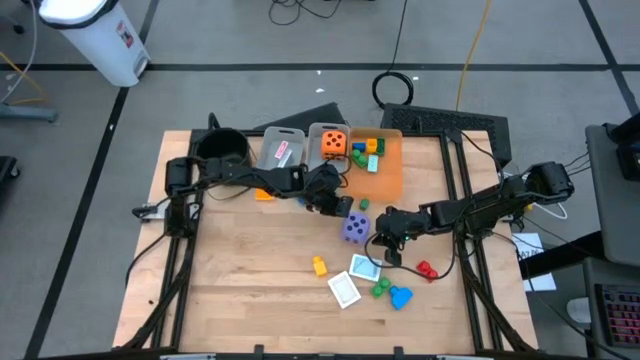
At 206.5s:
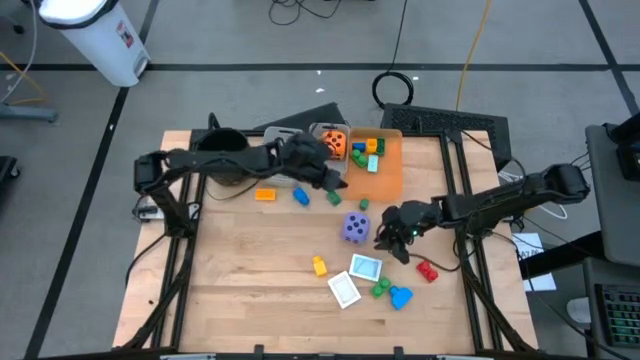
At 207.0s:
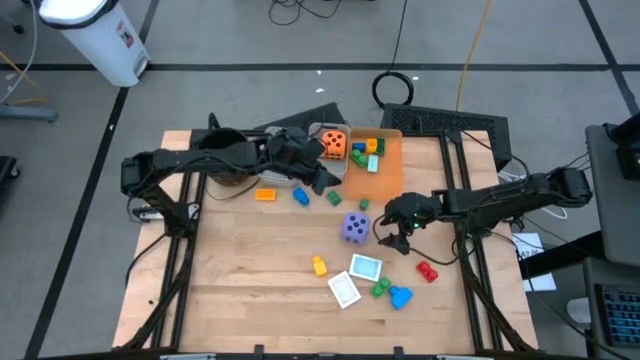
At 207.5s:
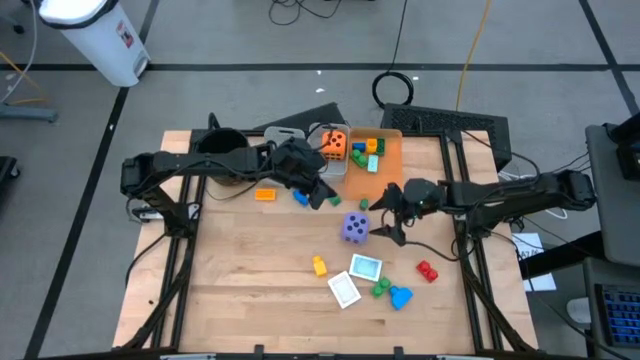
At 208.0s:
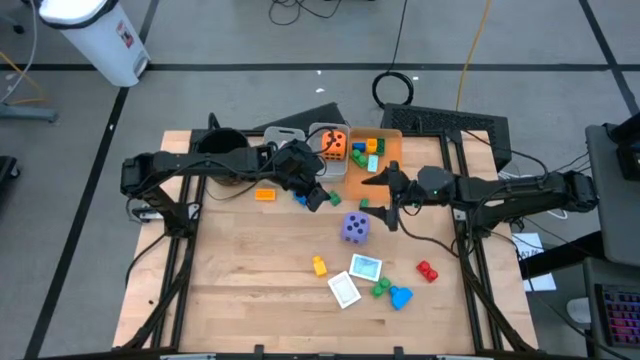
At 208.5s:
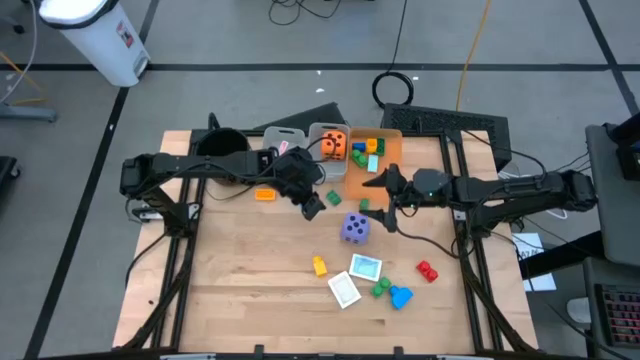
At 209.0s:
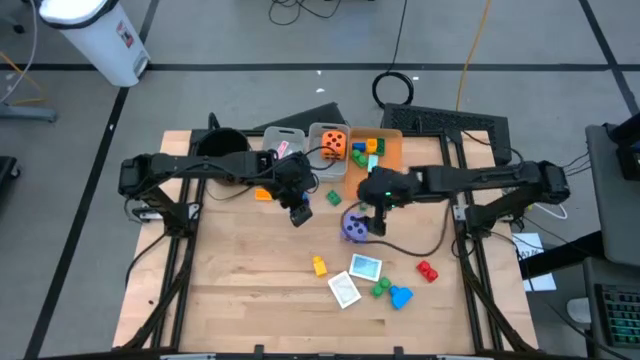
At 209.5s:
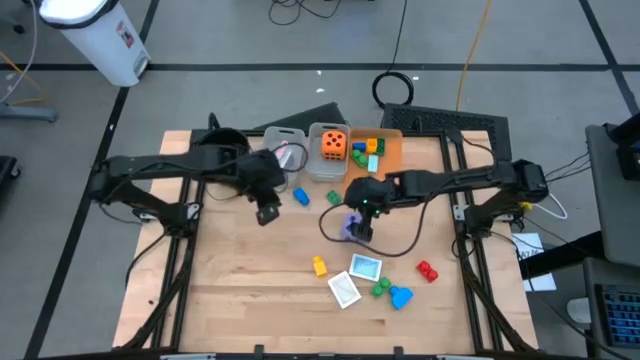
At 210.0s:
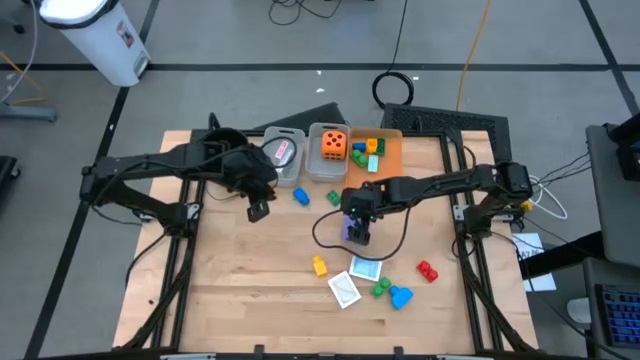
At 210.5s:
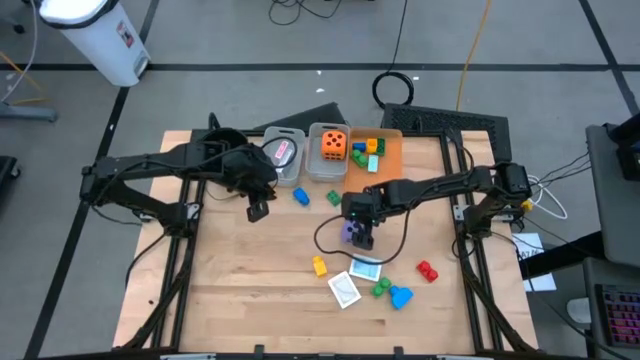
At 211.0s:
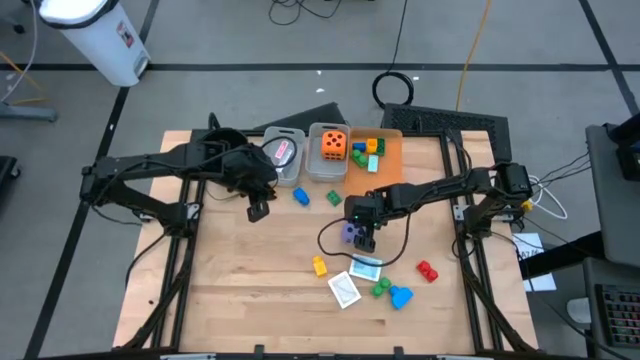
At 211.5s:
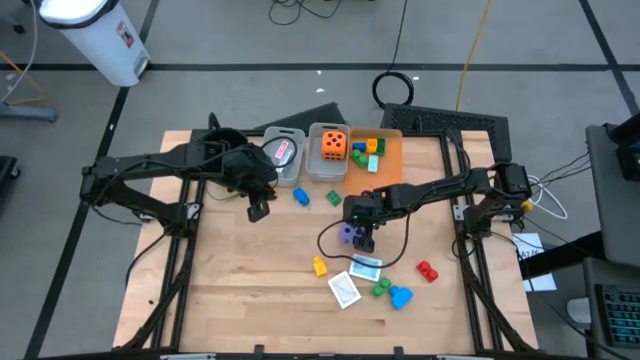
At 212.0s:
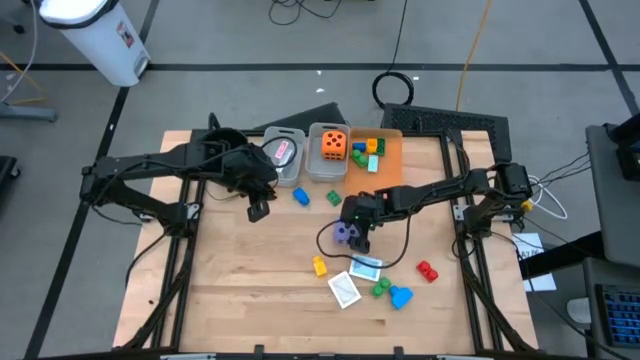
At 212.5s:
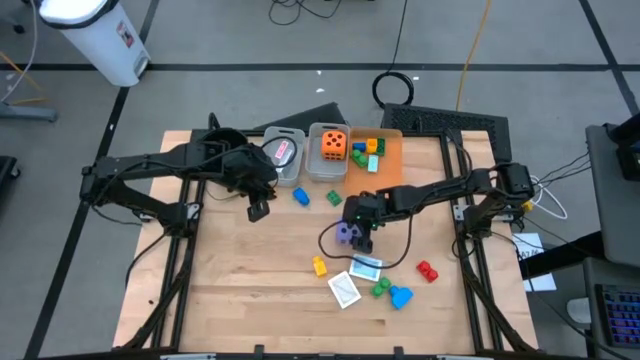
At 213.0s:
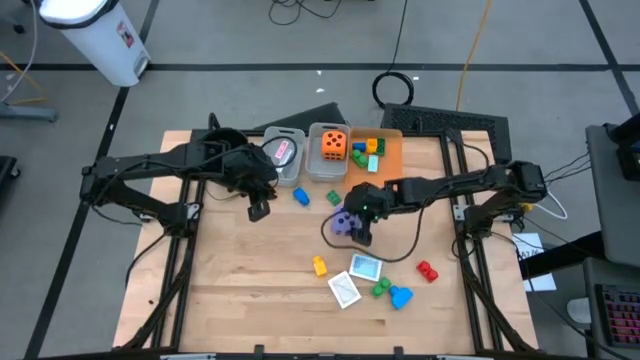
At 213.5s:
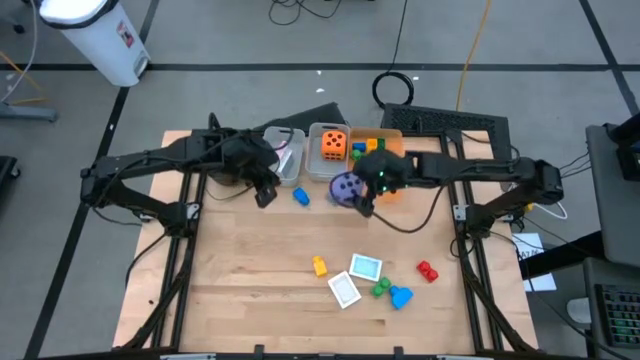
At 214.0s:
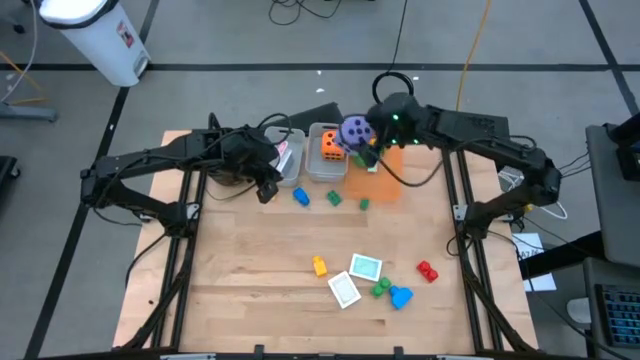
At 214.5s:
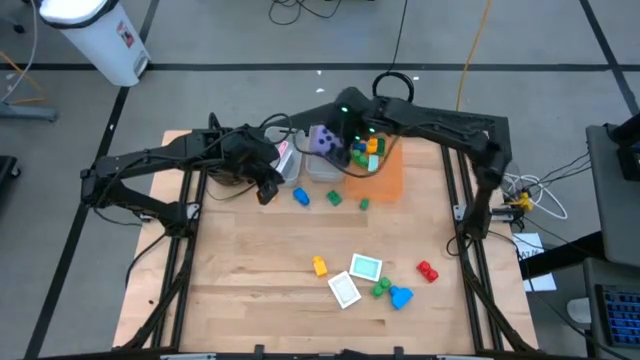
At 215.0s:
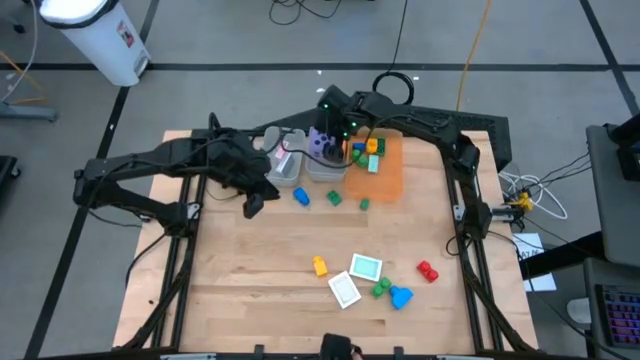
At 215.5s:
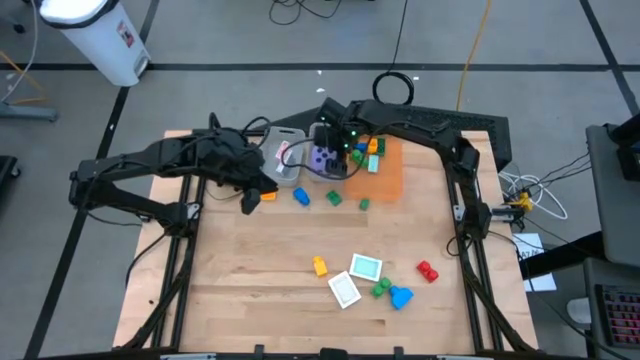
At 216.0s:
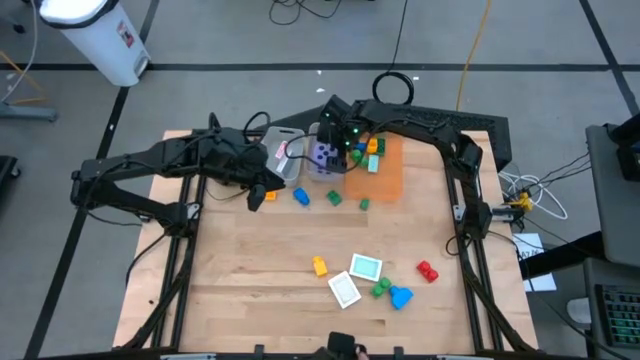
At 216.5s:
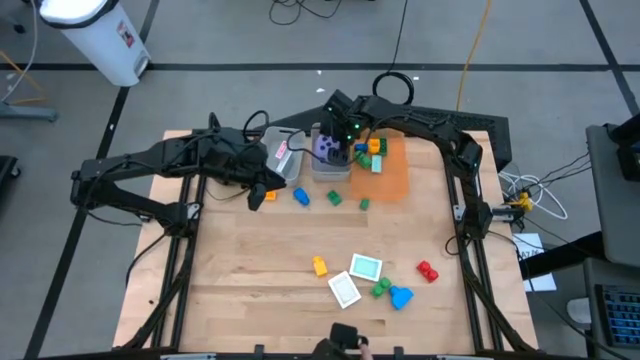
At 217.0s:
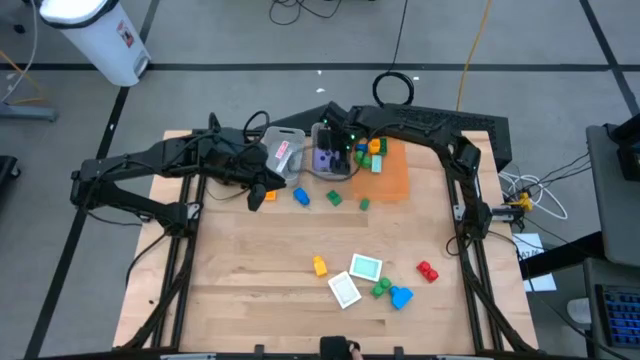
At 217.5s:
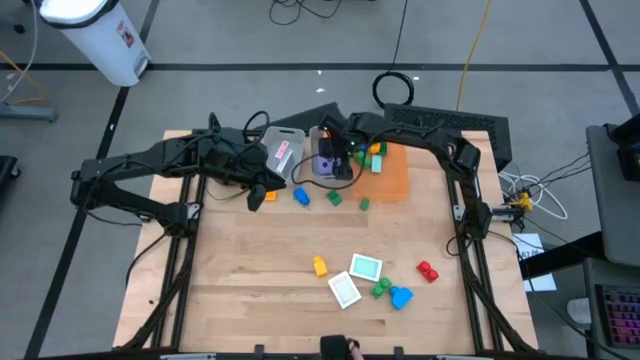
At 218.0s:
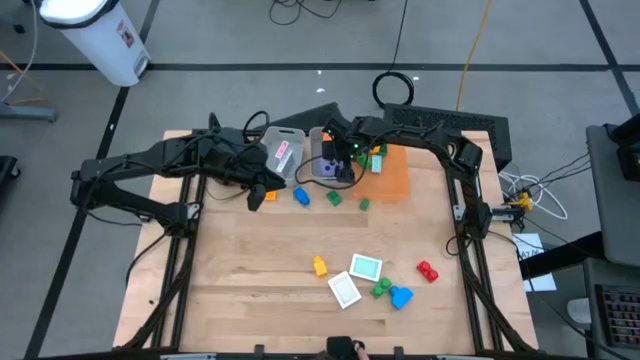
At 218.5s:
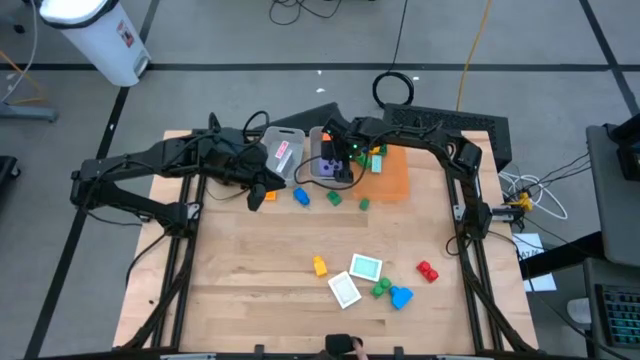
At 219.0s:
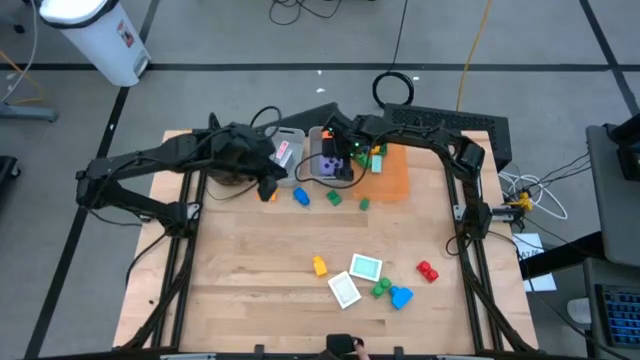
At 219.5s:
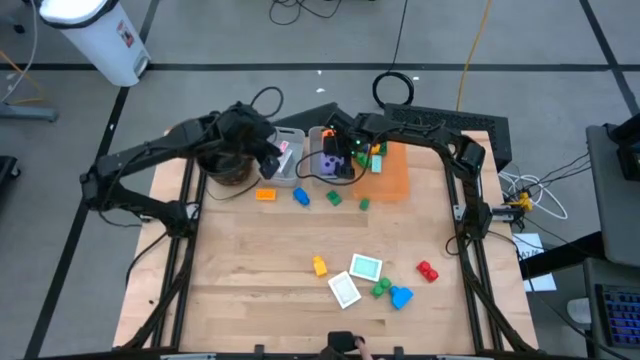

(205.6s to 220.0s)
Task: Pick & Place Toys
Put the purple dice into the right gray bin
